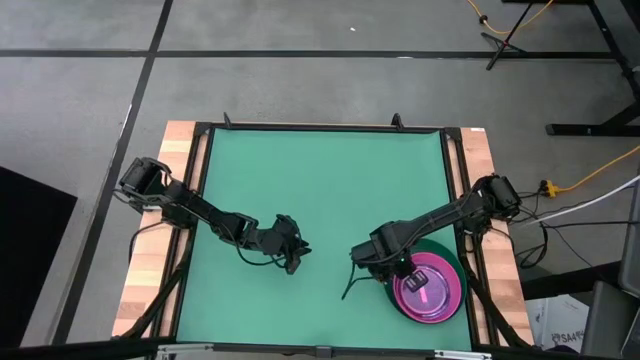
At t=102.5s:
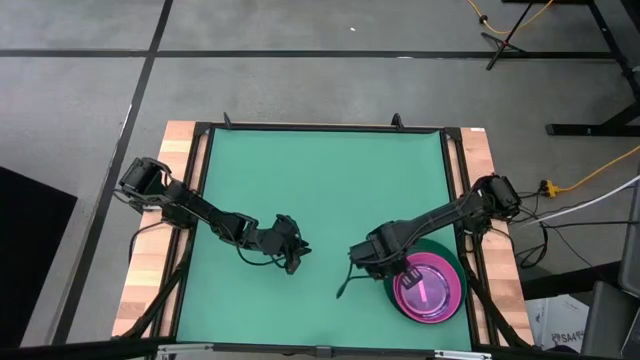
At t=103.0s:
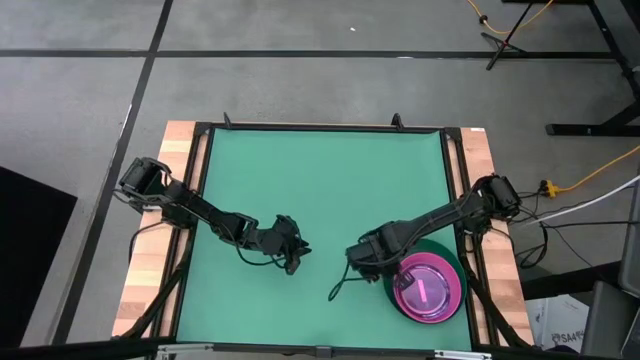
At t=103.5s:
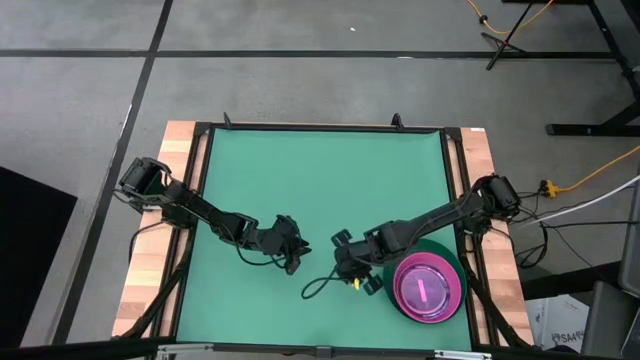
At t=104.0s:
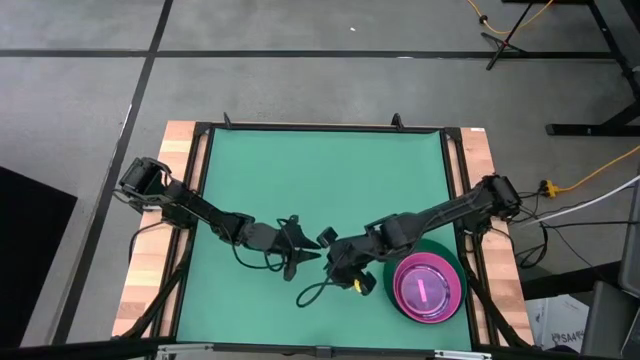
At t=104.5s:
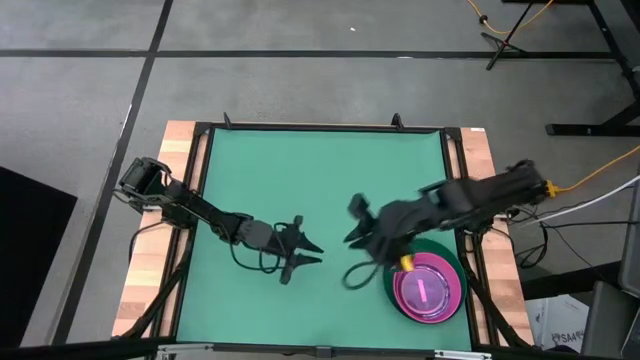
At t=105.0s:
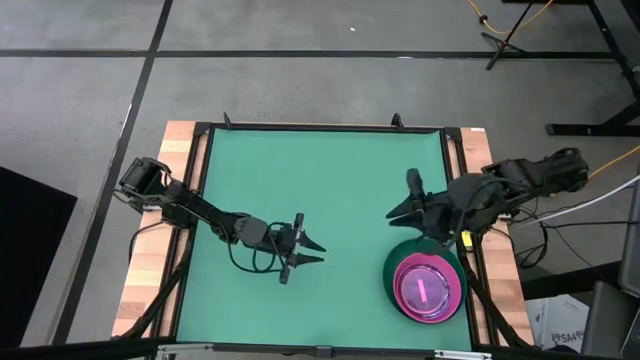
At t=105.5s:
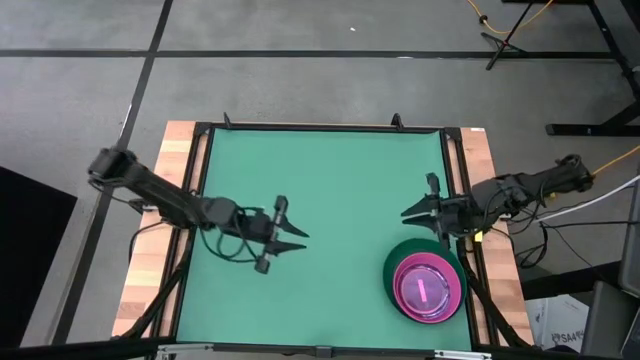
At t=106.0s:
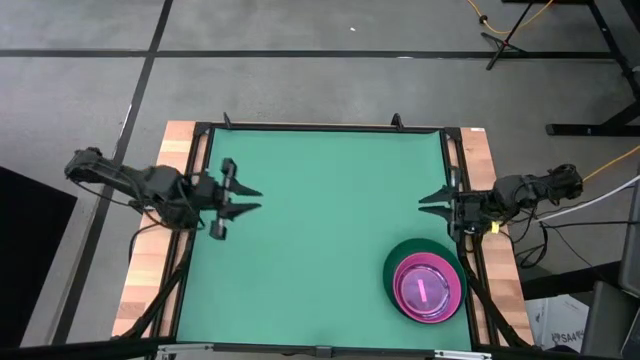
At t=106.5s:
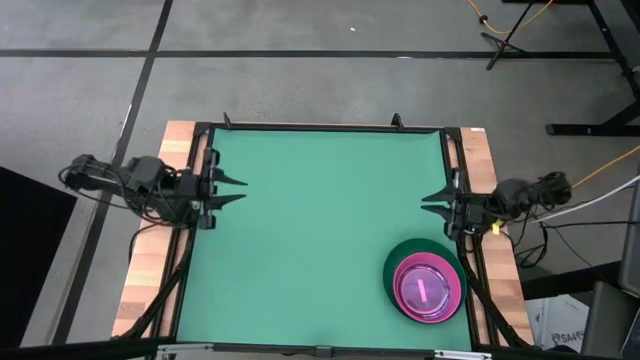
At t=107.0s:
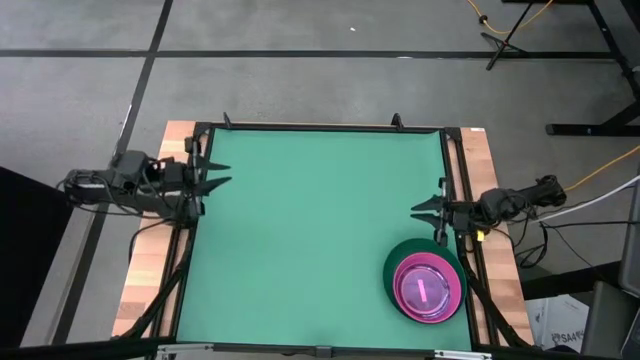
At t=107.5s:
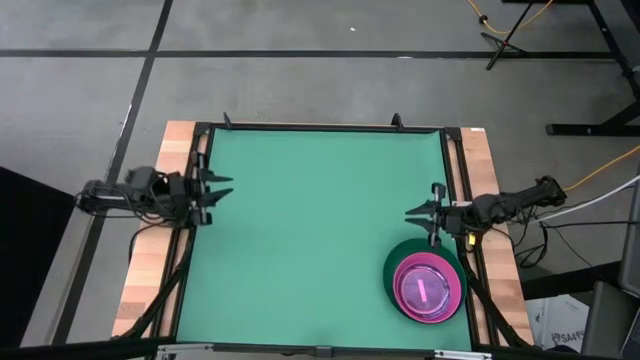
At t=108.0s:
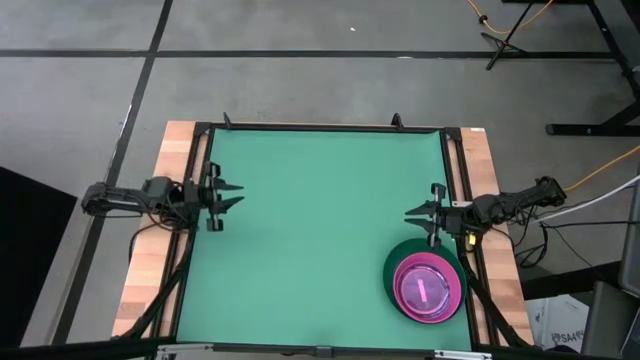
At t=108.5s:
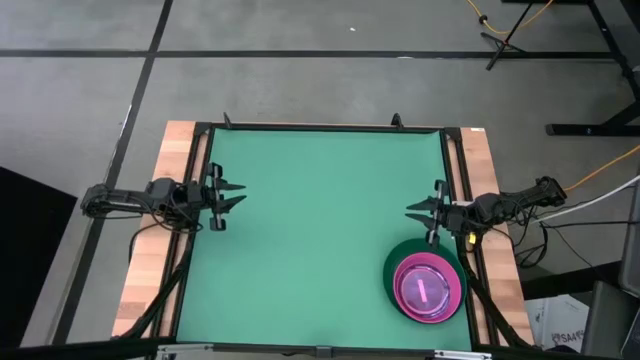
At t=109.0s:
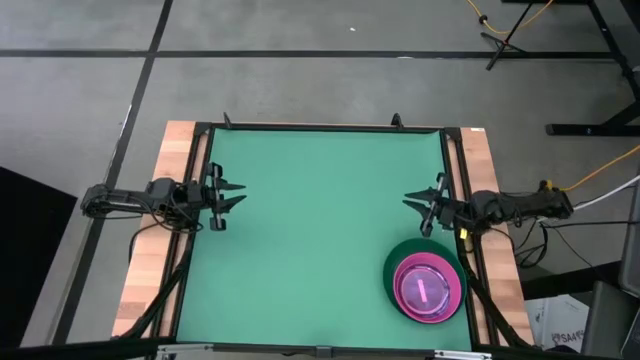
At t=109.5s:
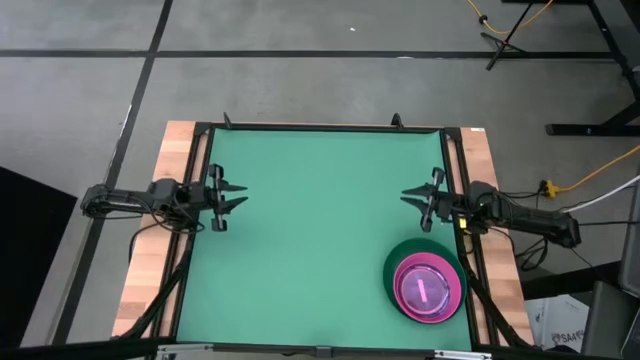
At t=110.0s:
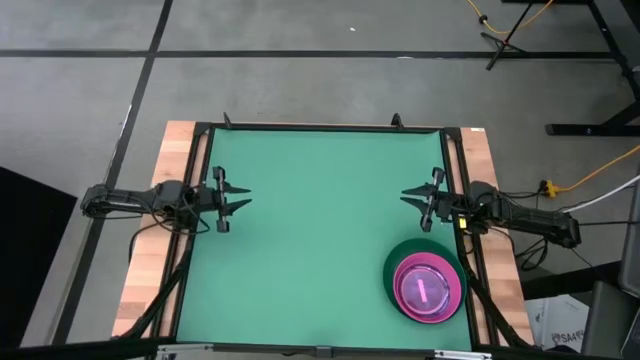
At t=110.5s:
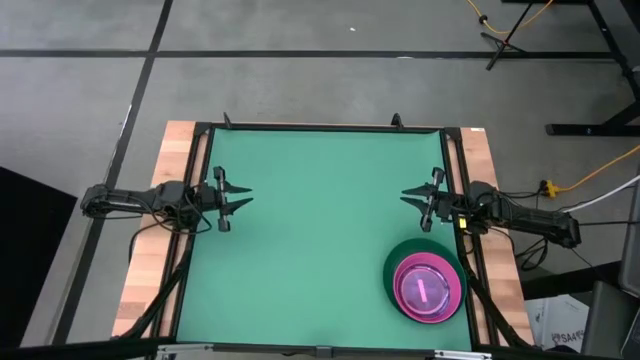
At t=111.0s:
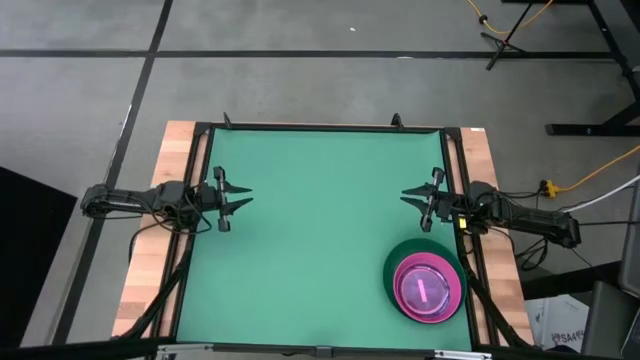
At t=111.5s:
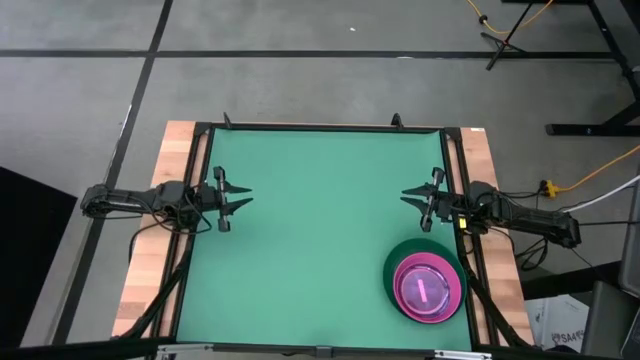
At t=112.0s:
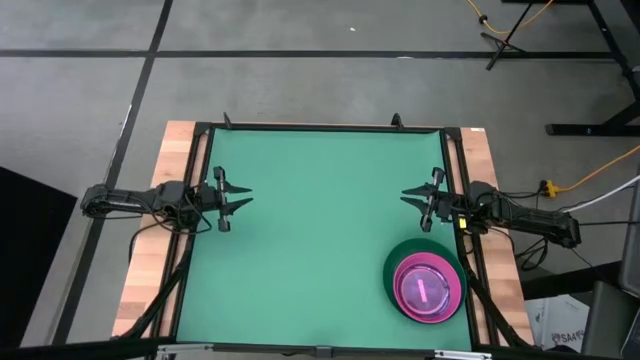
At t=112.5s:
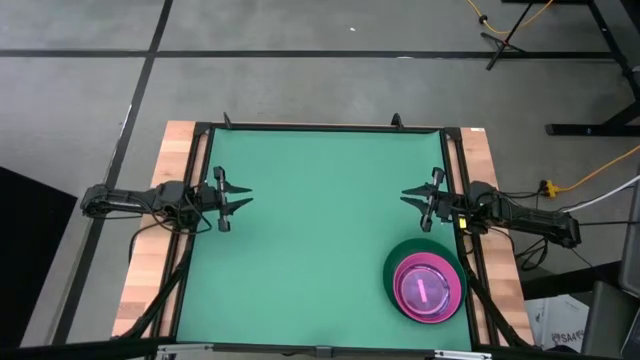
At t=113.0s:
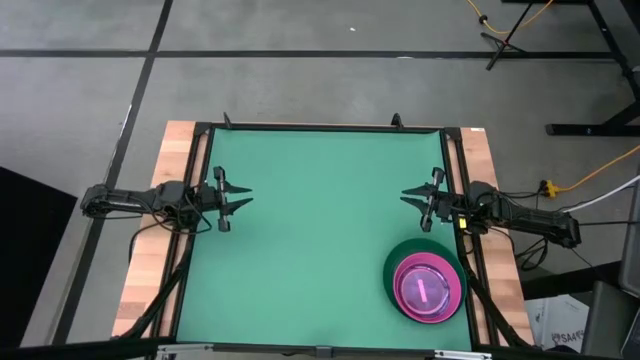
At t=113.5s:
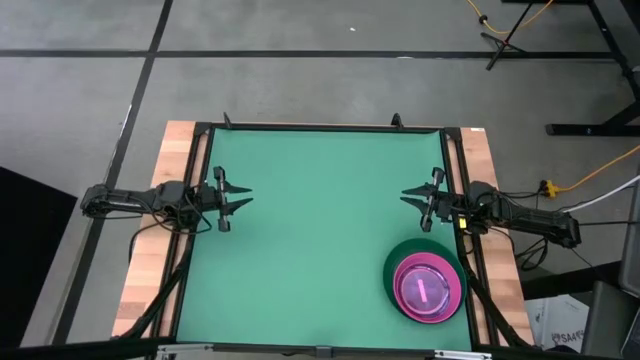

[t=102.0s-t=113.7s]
Task: Stack plastic plates
Return to Home Position

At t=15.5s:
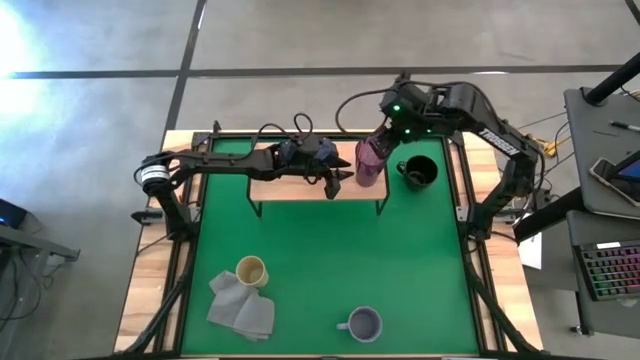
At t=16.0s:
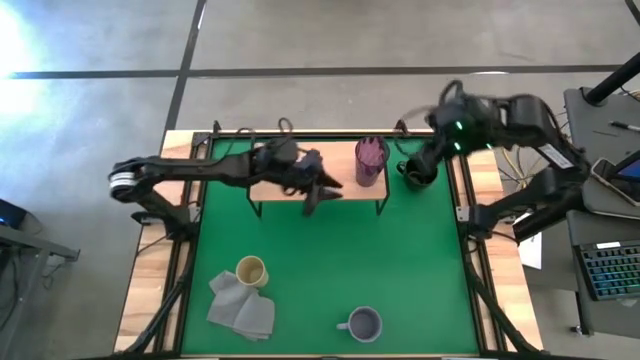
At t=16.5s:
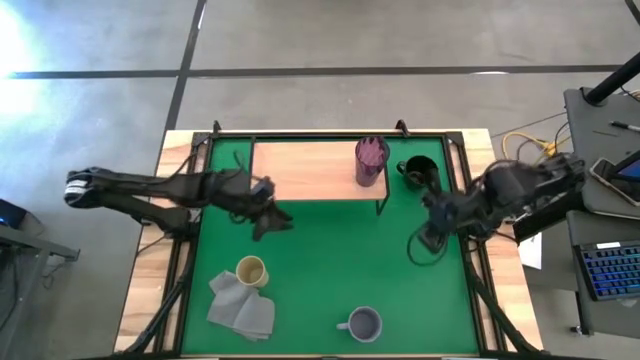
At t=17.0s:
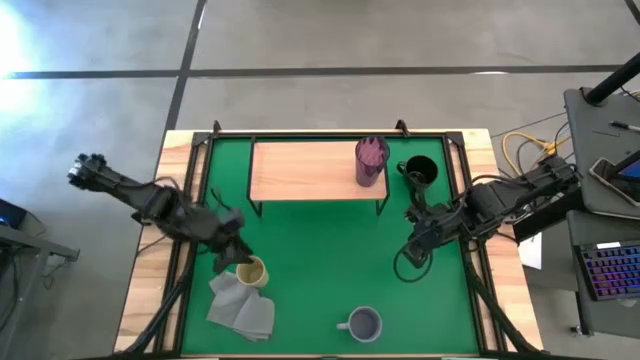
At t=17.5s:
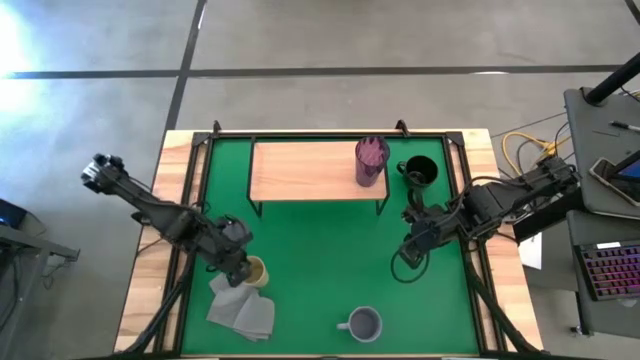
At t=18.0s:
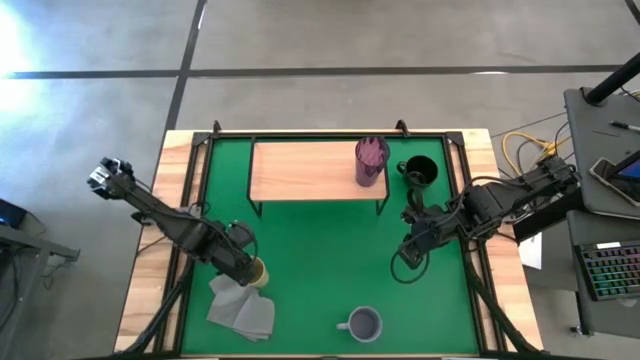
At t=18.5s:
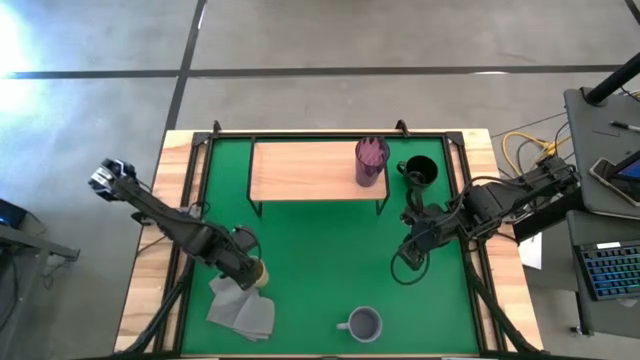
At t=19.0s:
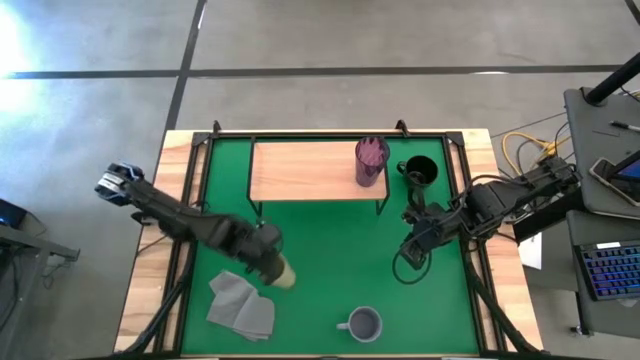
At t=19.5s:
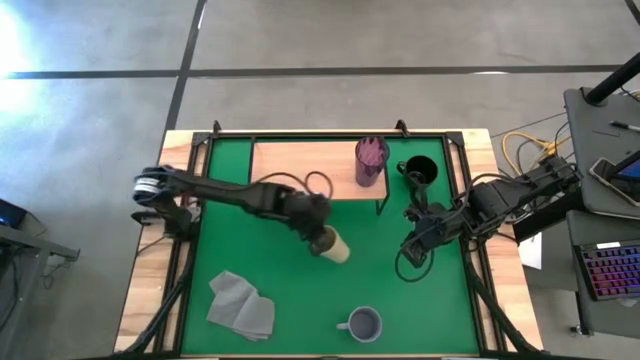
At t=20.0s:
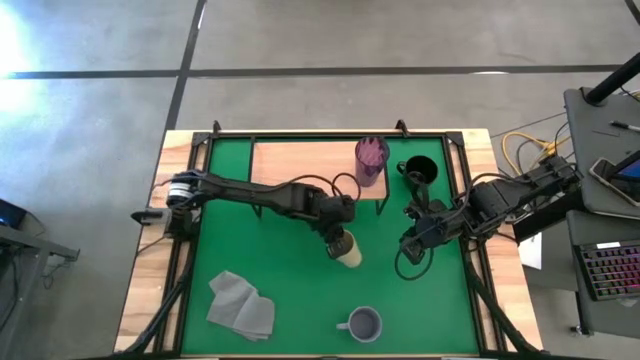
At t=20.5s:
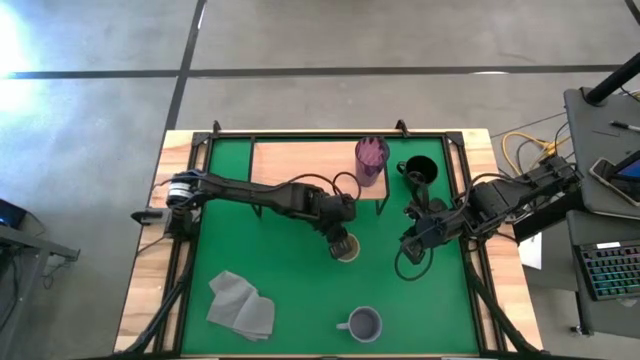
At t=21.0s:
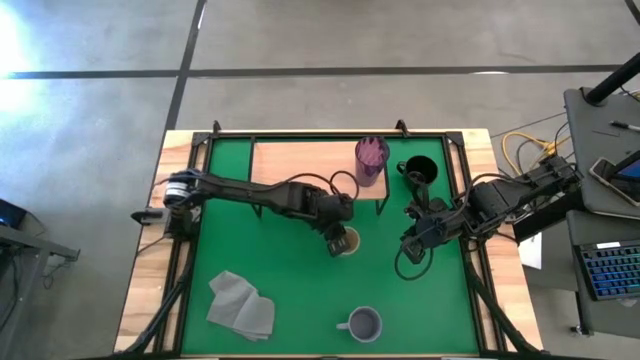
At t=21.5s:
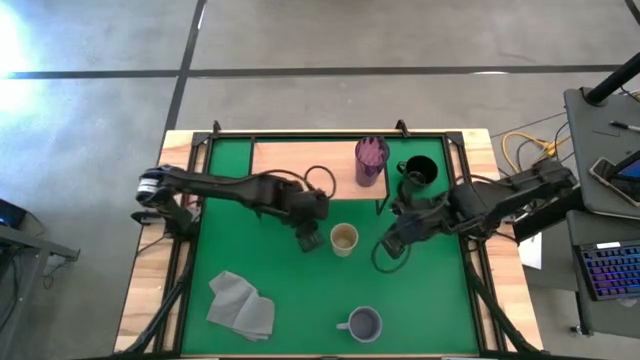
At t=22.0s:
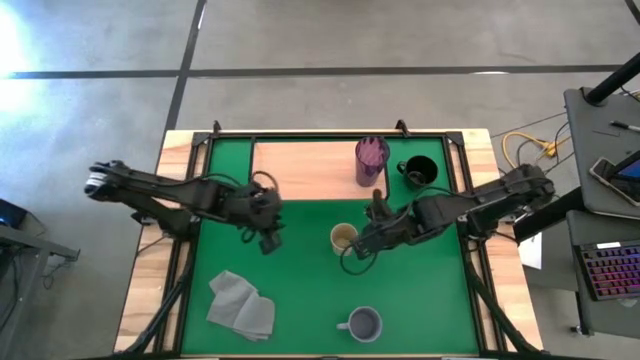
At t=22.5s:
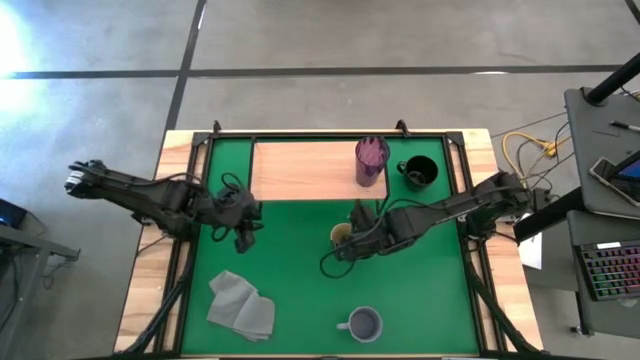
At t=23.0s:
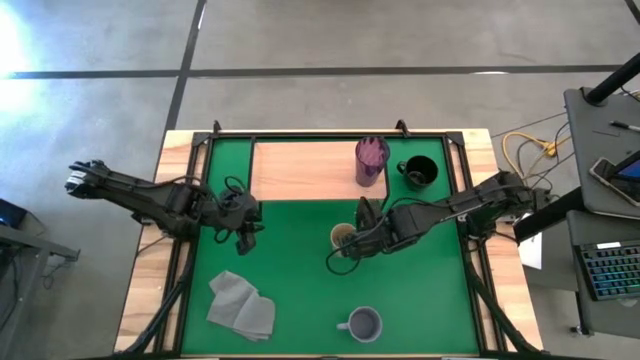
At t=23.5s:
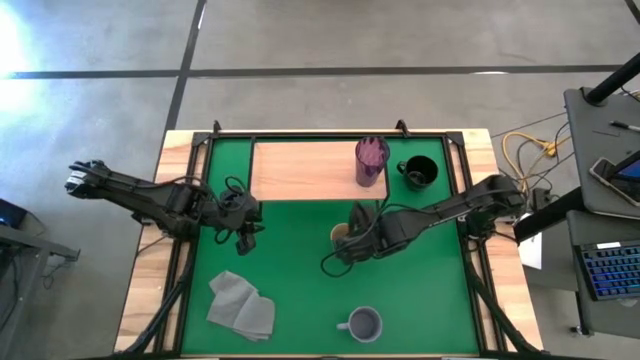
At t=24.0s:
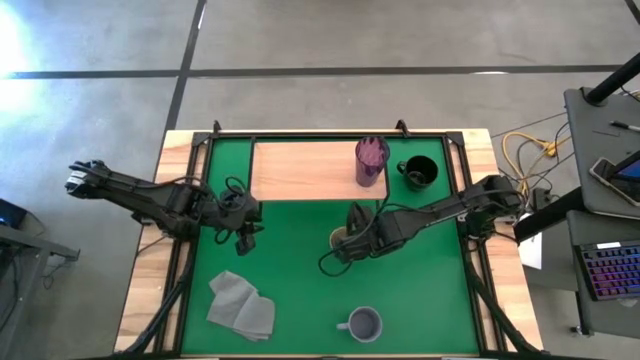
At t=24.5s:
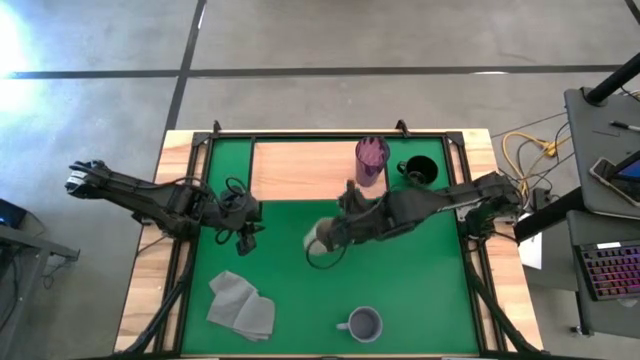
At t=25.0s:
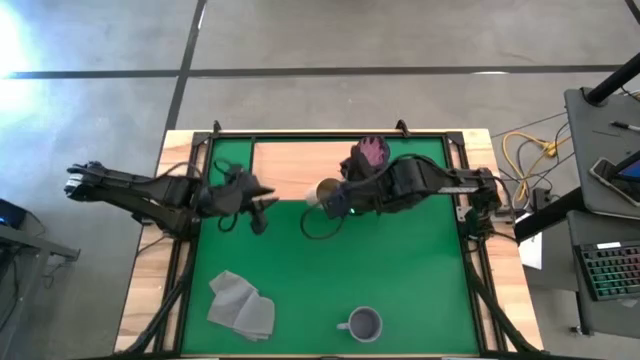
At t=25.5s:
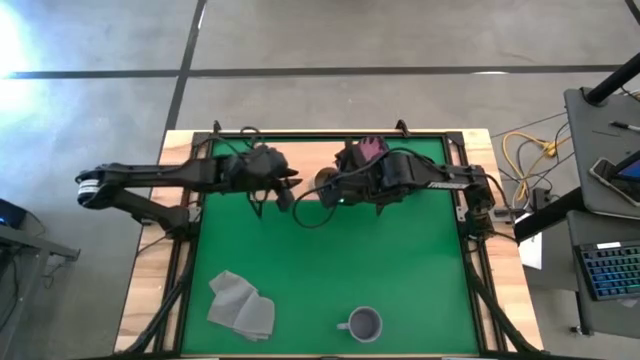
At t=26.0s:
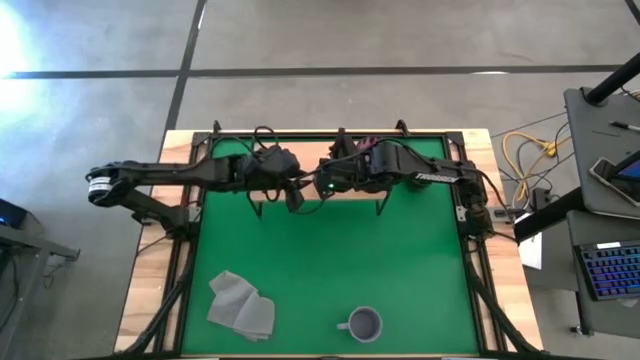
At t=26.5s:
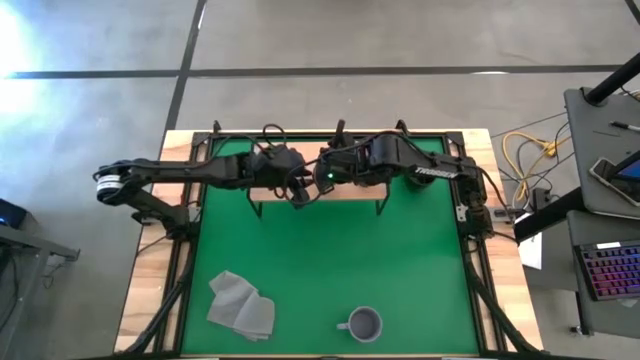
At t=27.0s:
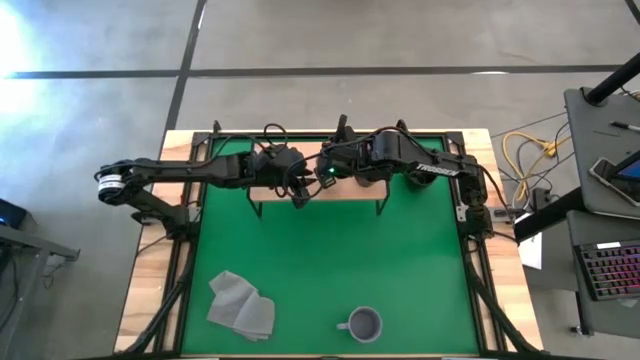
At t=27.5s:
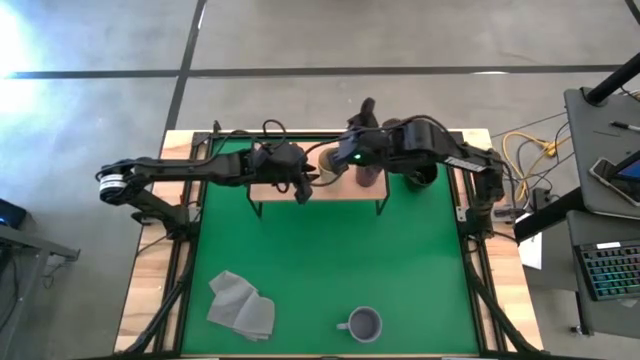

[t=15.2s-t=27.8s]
Task: Stack small to large cups/mugs on shelf
Put the yellow cup on the shelf
